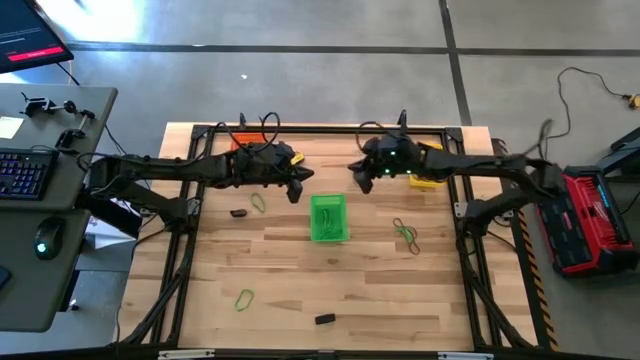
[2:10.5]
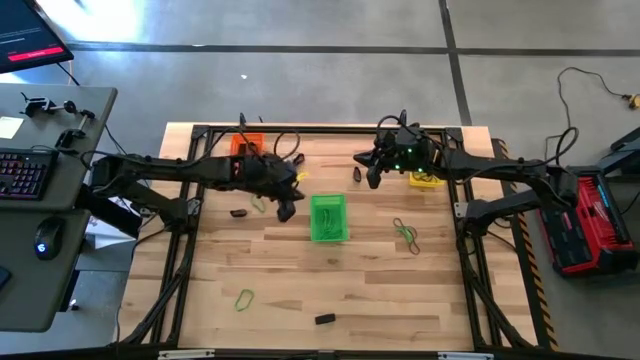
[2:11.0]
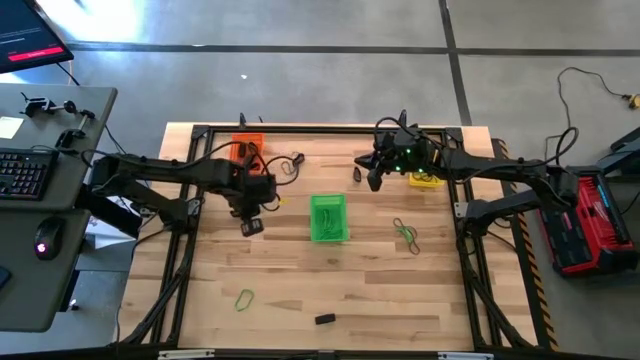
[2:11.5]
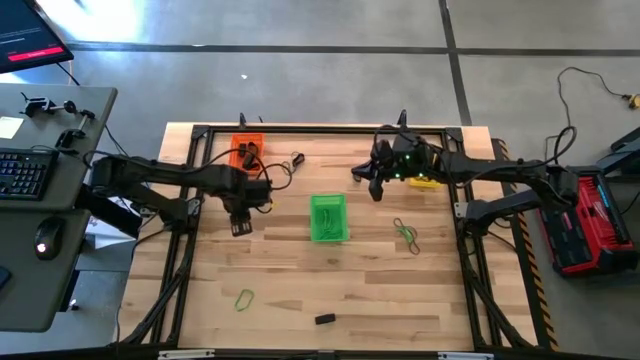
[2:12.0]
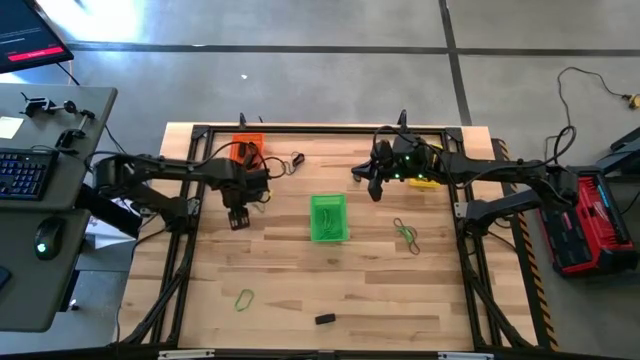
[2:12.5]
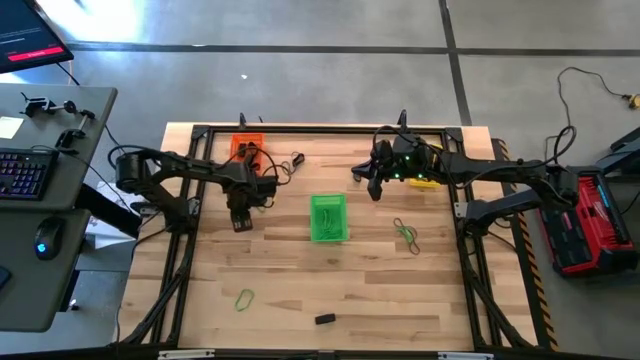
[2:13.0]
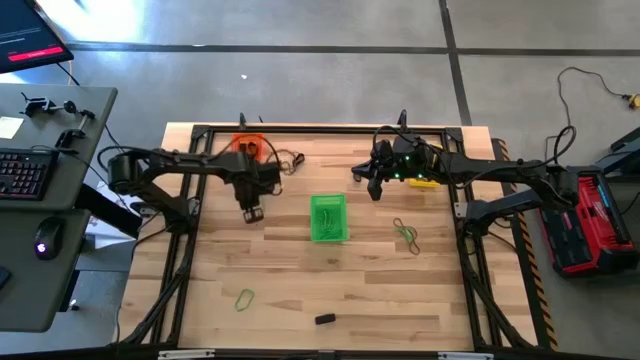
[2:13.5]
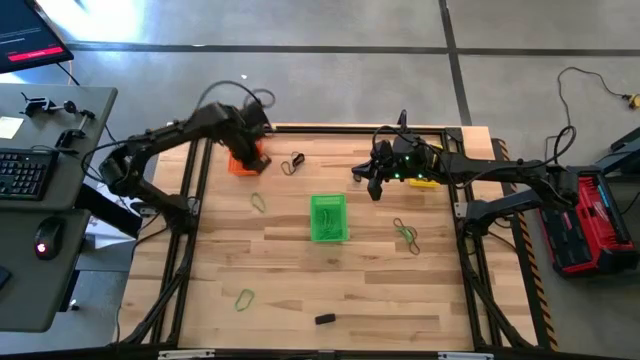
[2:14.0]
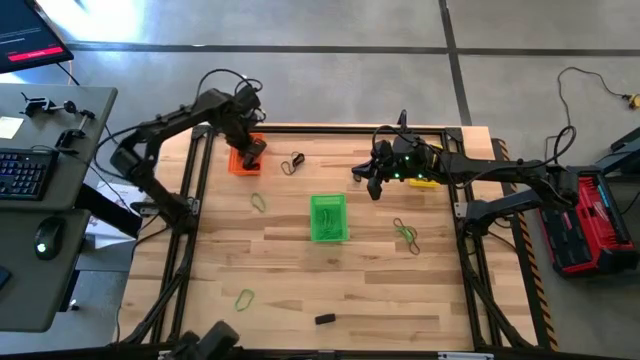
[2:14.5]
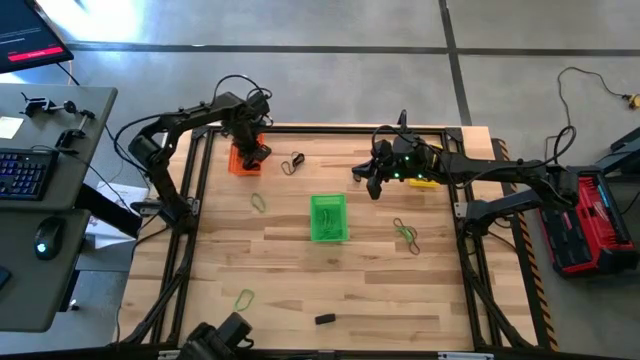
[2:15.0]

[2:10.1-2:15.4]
Task: Sort rubber bands into baskets
Put the black rubber band into the orange bin

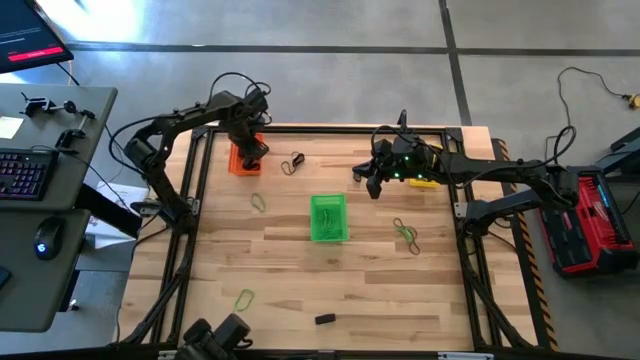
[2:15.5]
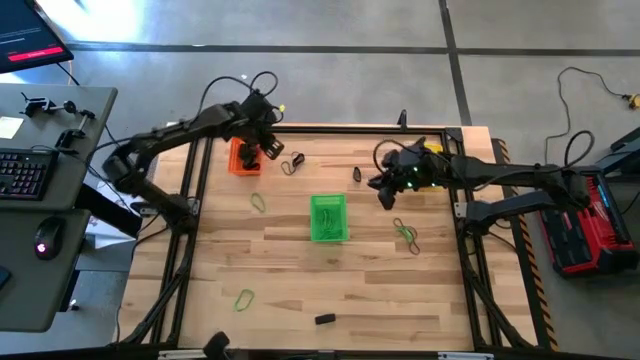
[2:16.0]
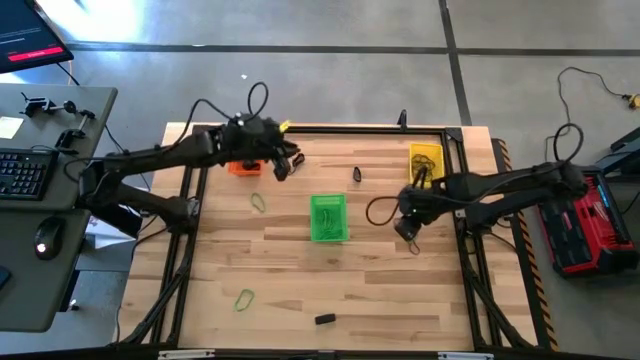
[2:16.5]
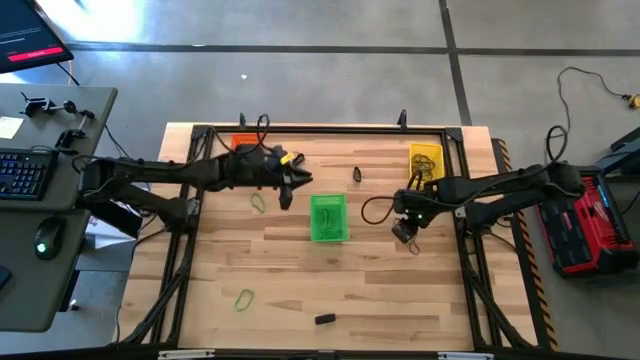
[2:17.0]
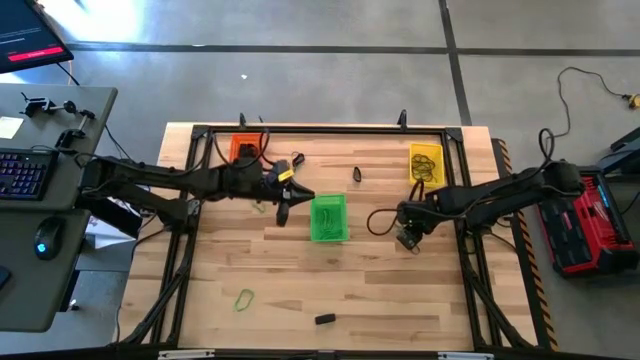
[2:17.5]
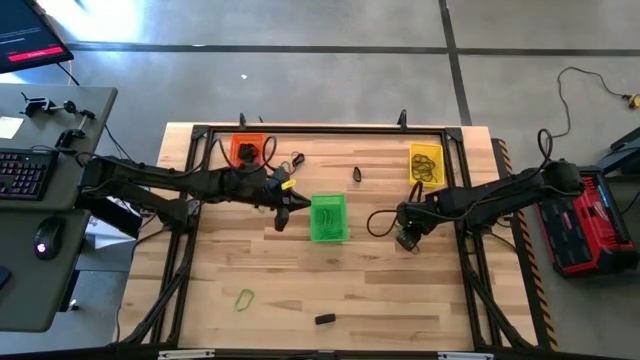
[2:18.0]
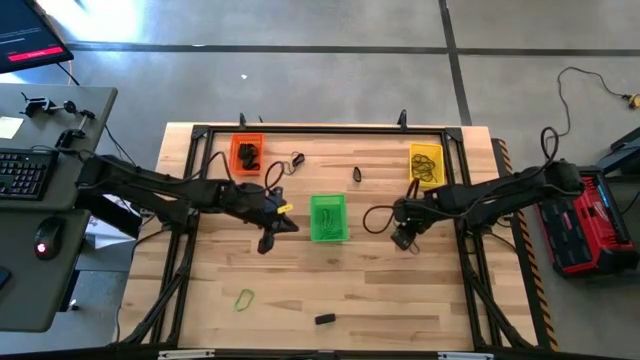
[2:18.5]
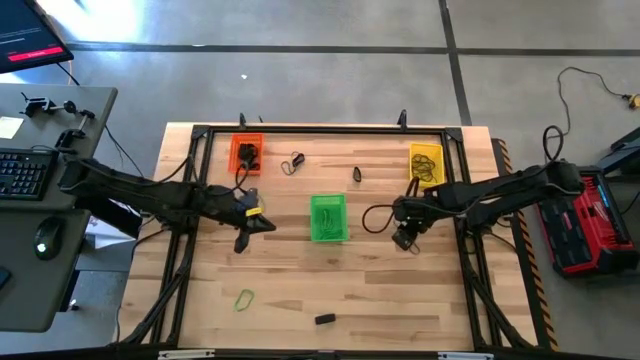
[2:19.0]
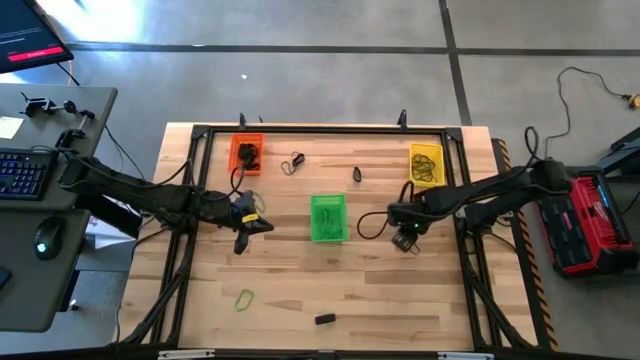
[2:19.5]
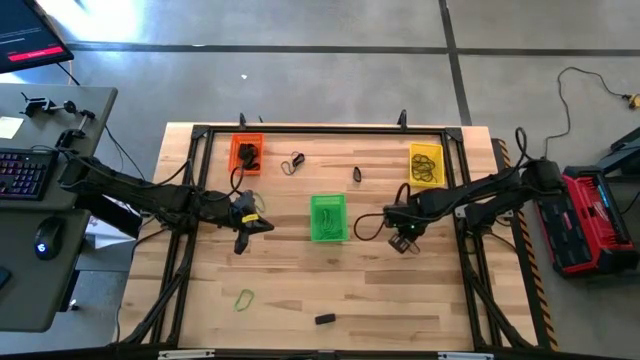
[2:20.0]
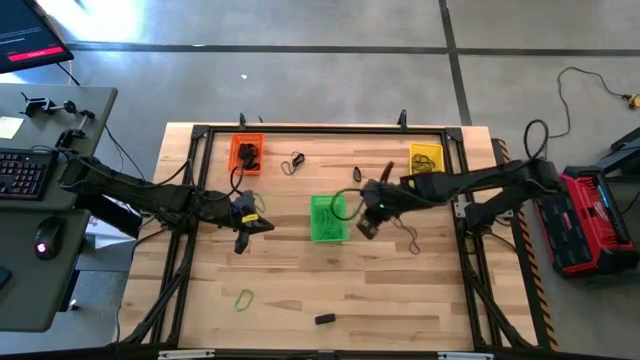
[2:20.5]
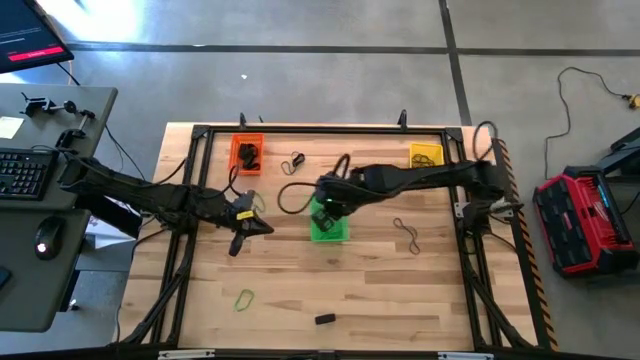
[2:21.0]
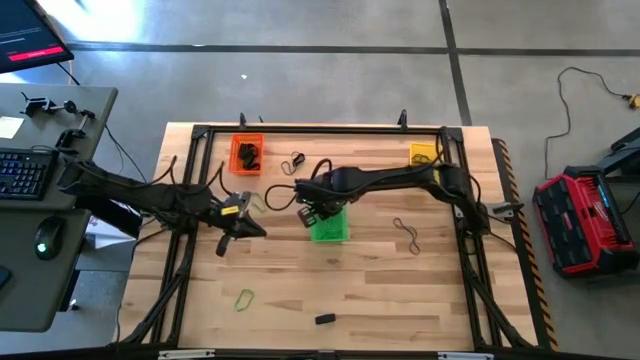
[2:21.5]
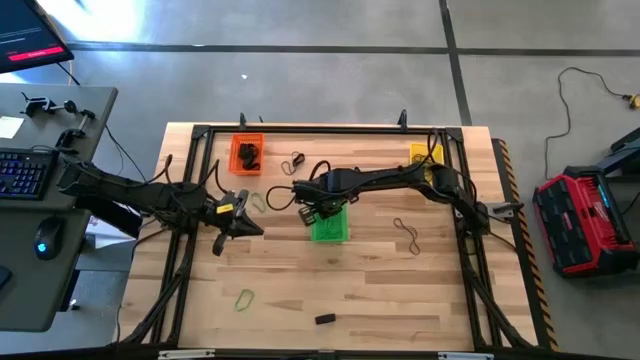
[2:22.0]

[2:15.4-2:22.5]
Put the green rubber band into the green bin

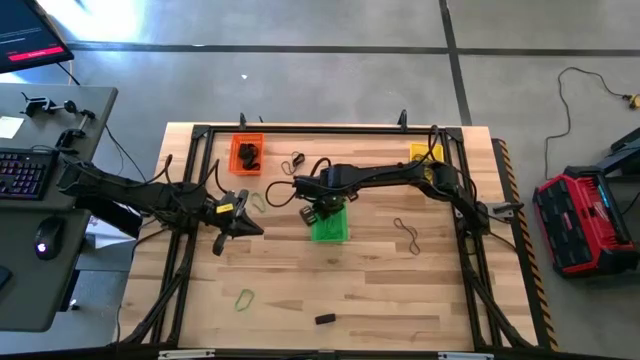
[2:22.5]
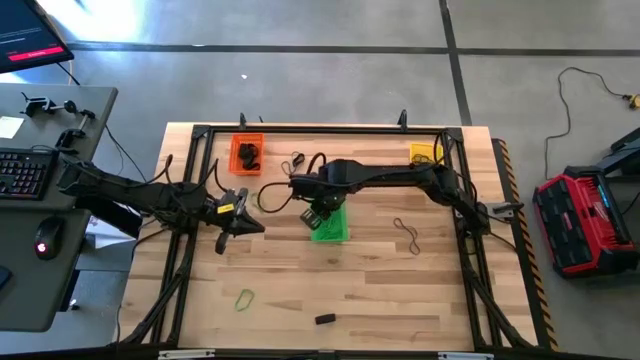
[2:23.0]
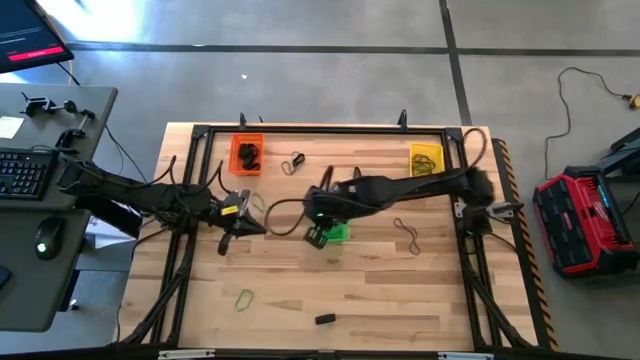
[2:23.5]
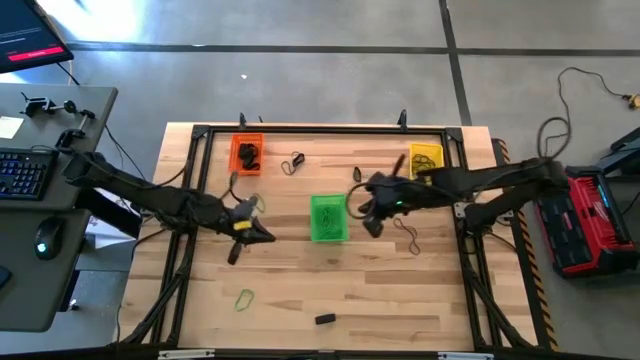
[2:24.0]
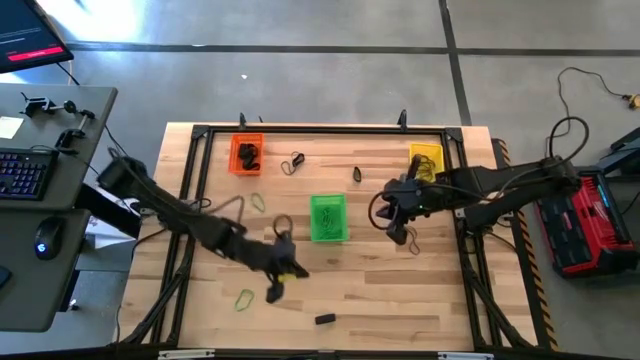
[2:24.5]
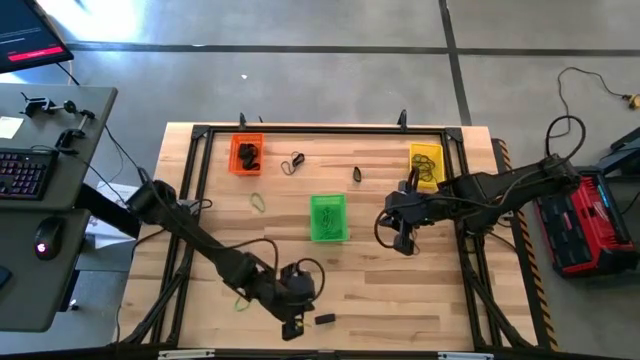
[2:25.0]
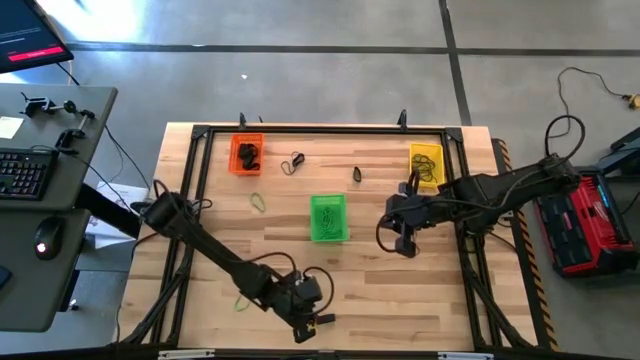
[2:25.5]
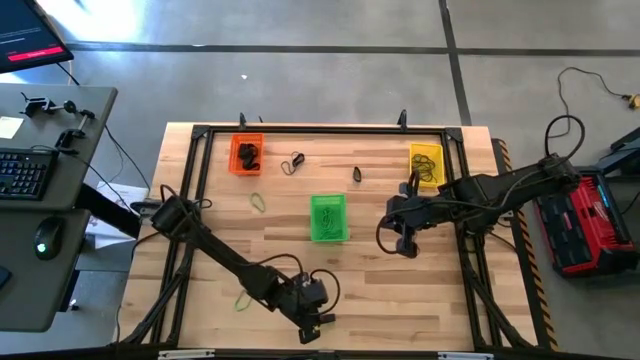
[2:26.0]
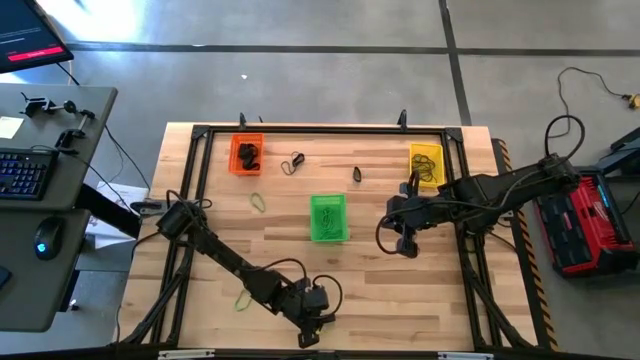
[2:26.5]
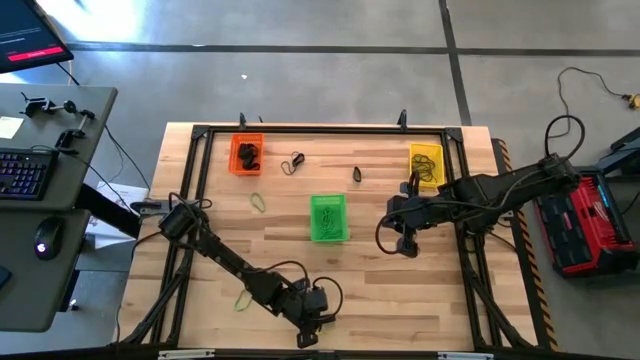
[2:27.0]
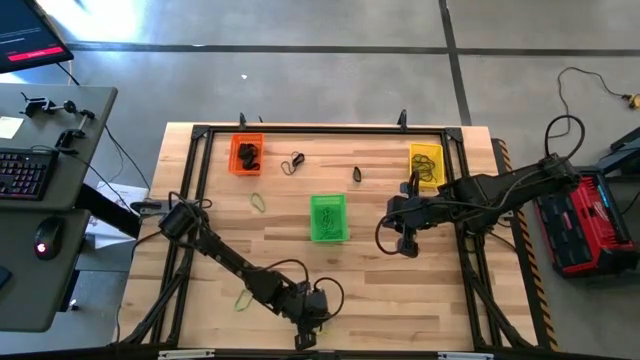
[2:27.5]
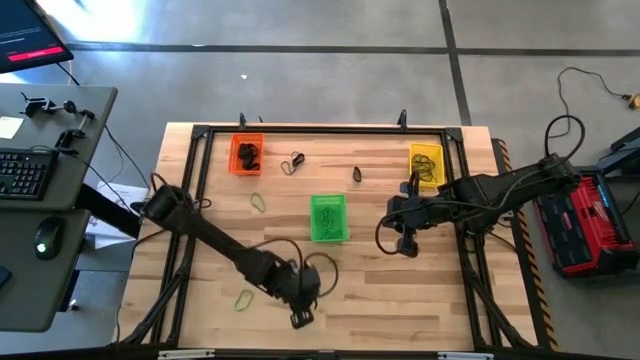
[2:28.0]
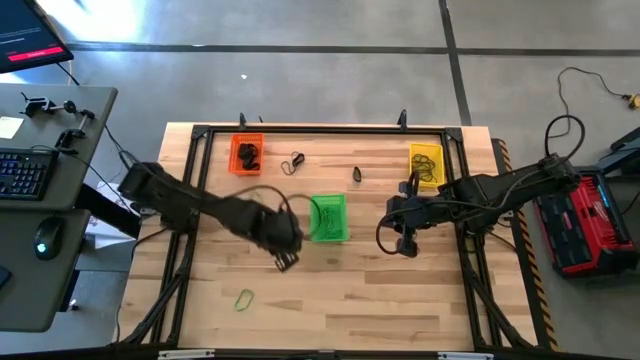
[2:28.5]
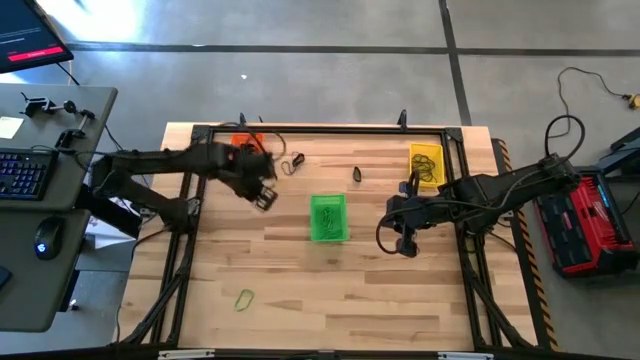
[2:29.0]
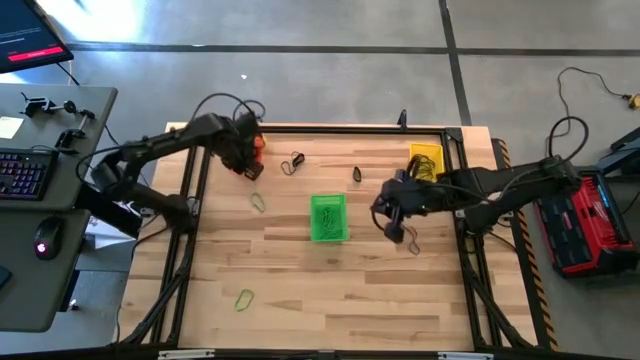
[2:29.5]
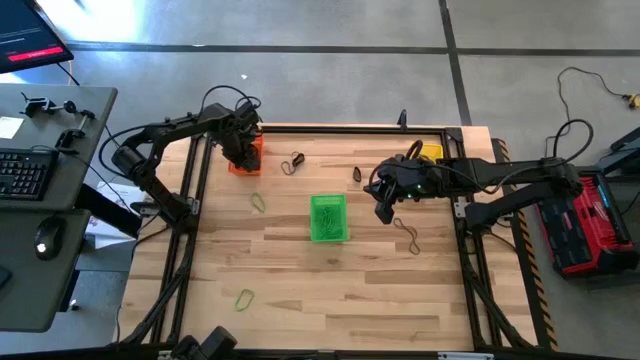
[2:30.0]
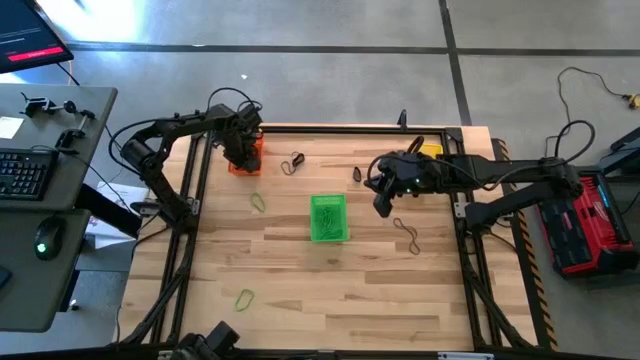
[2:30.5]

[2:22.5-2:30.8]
Put the black rubber band into the orange bin
